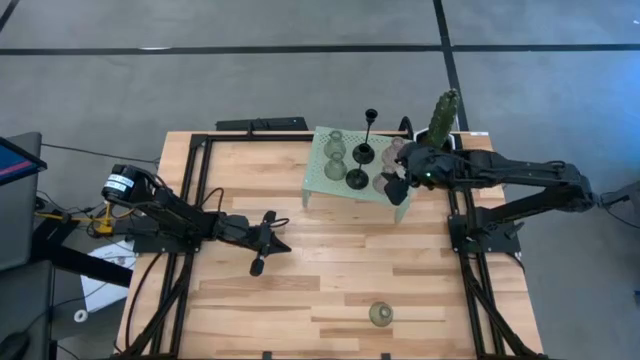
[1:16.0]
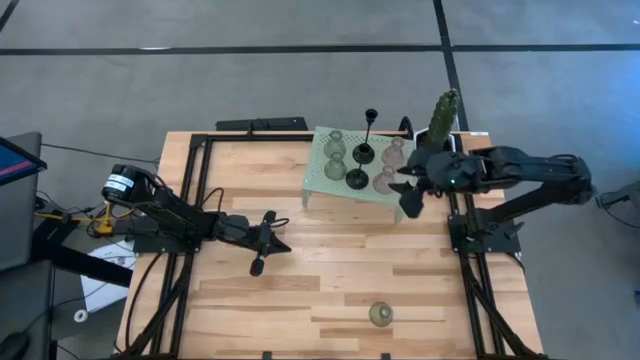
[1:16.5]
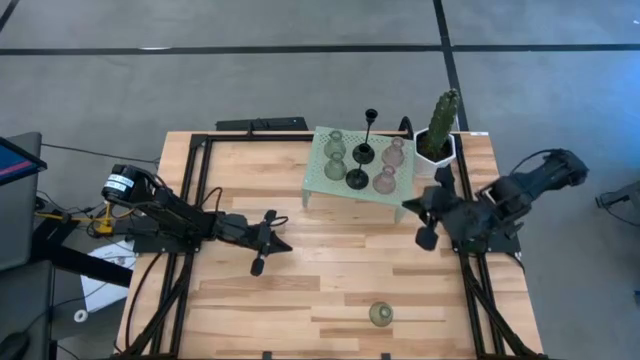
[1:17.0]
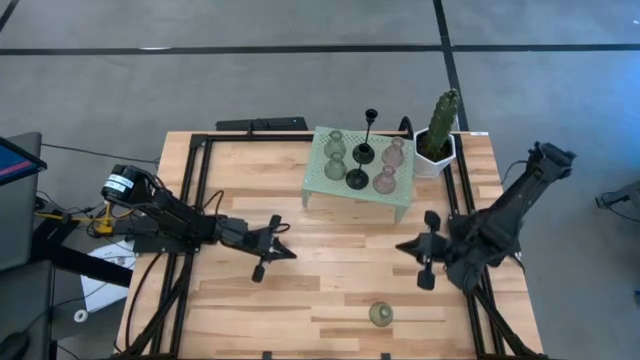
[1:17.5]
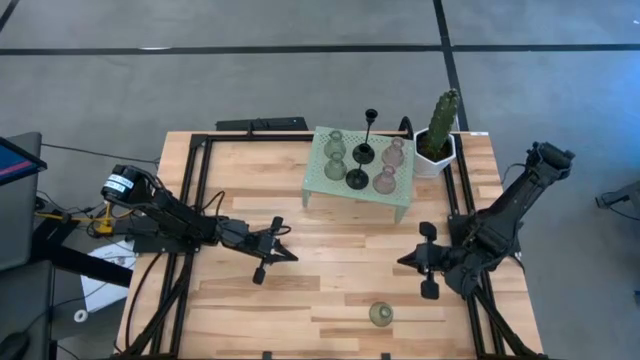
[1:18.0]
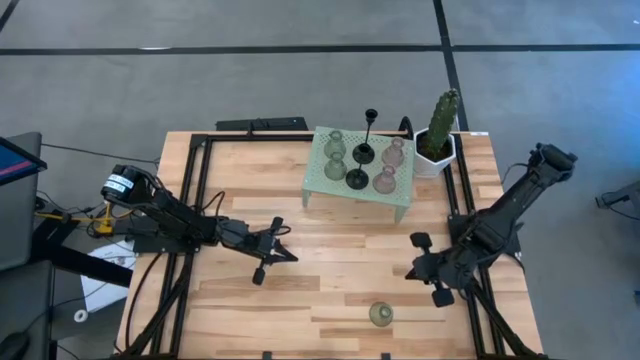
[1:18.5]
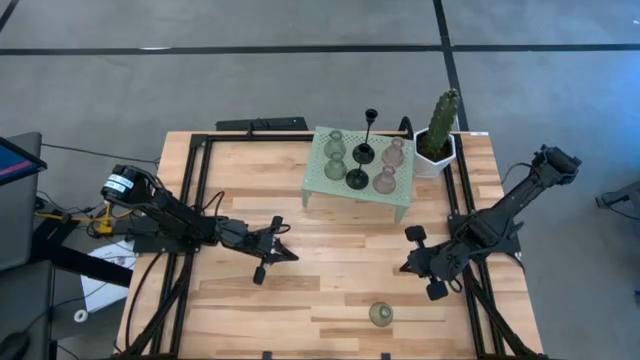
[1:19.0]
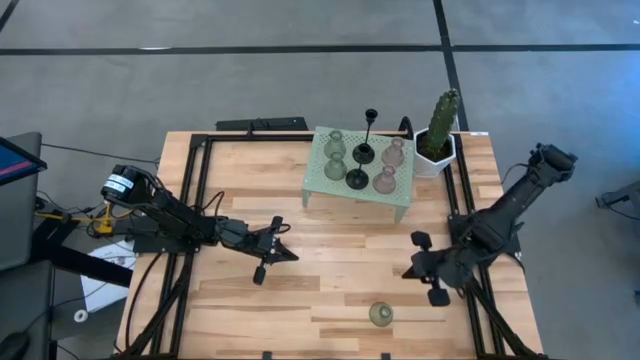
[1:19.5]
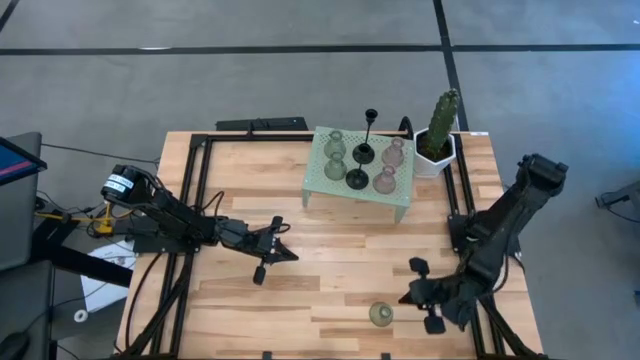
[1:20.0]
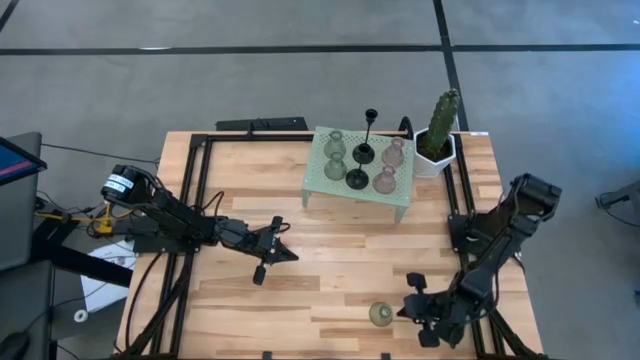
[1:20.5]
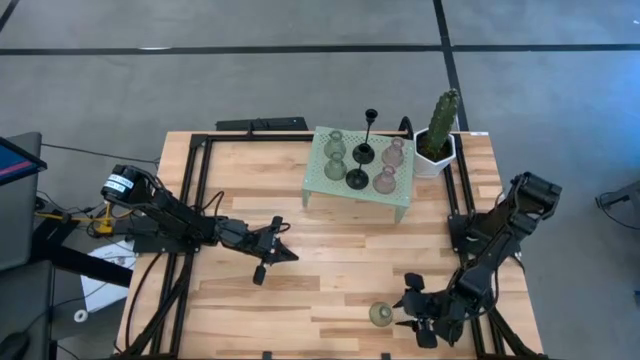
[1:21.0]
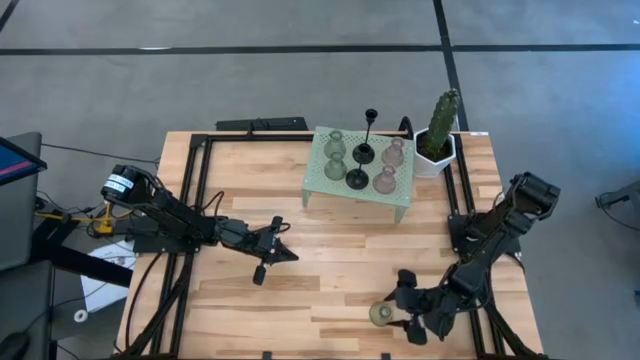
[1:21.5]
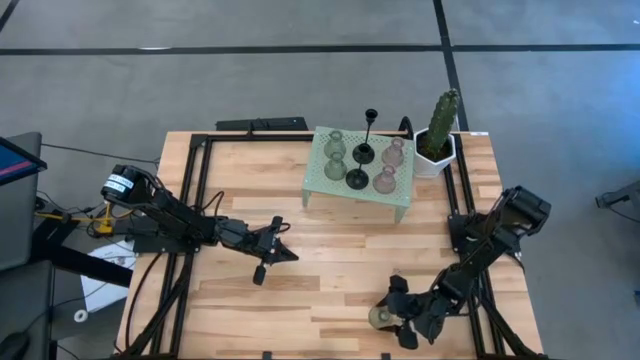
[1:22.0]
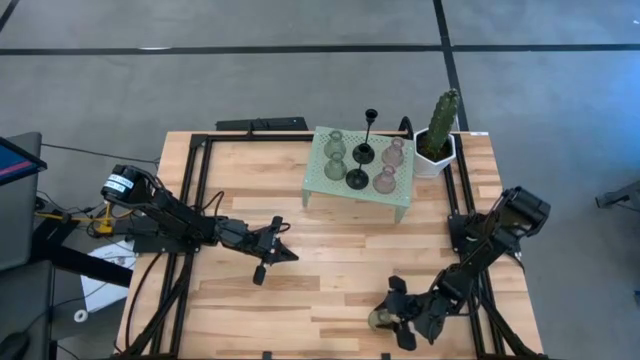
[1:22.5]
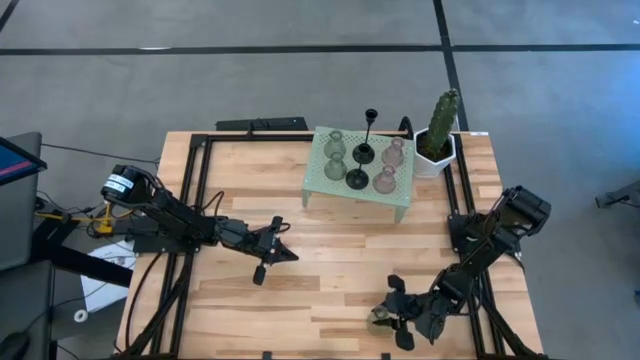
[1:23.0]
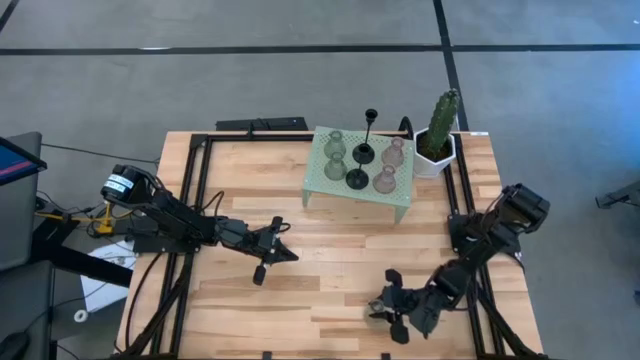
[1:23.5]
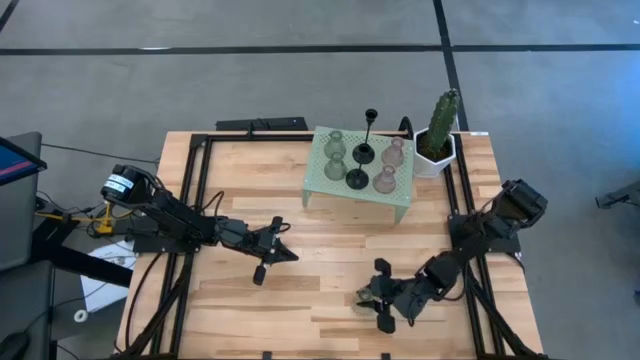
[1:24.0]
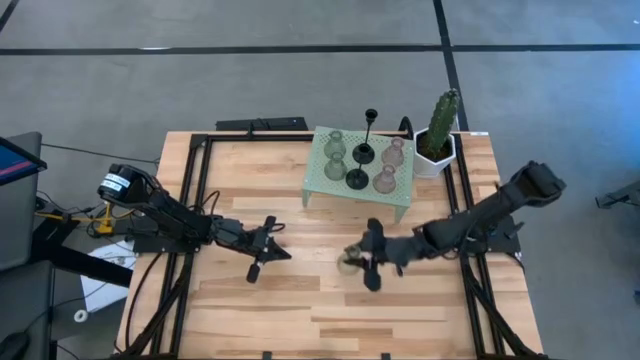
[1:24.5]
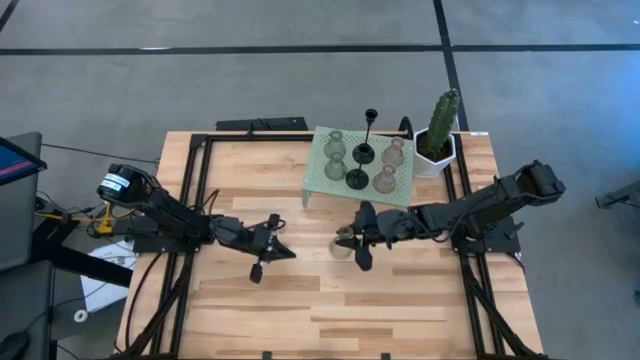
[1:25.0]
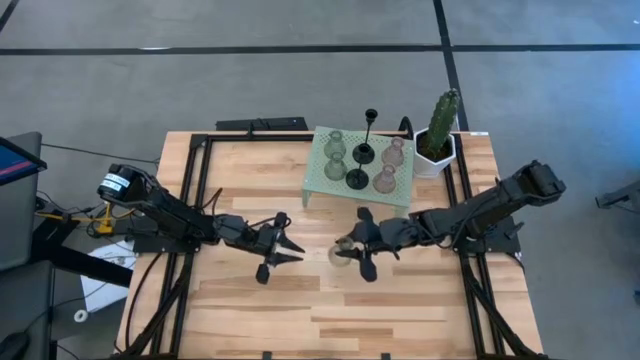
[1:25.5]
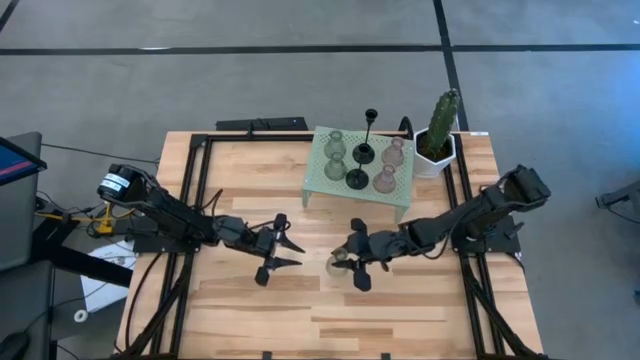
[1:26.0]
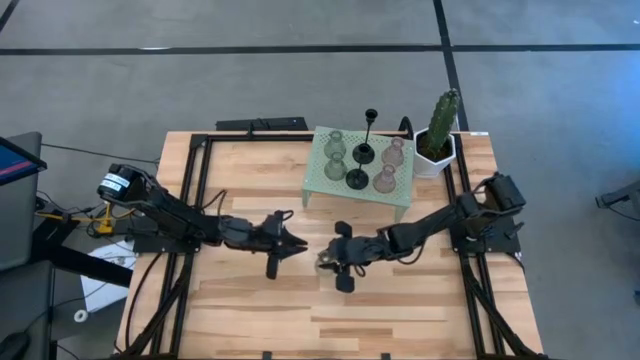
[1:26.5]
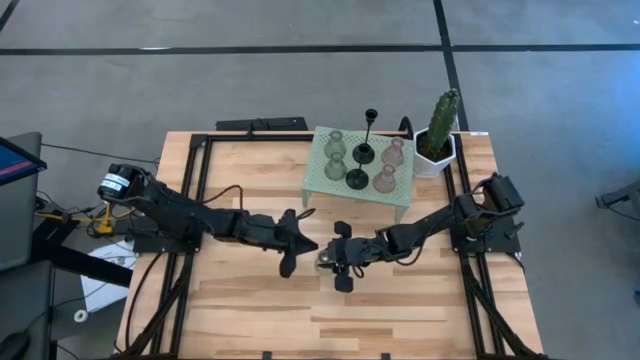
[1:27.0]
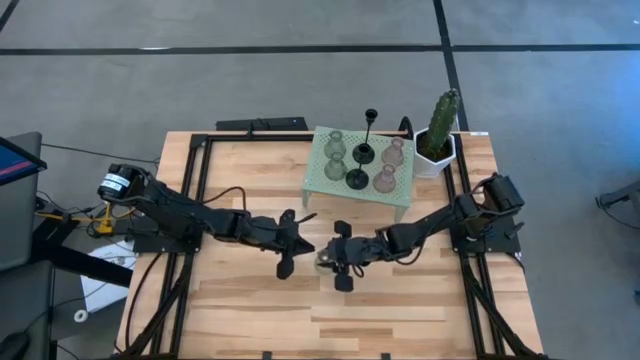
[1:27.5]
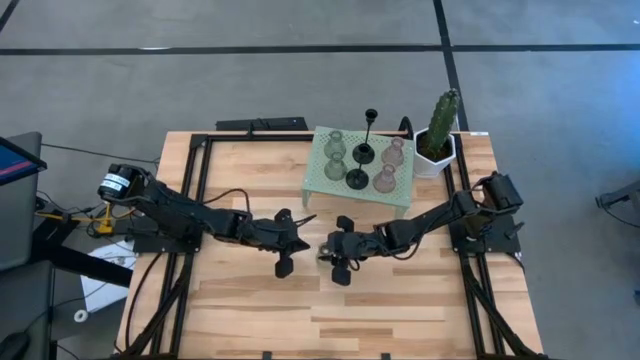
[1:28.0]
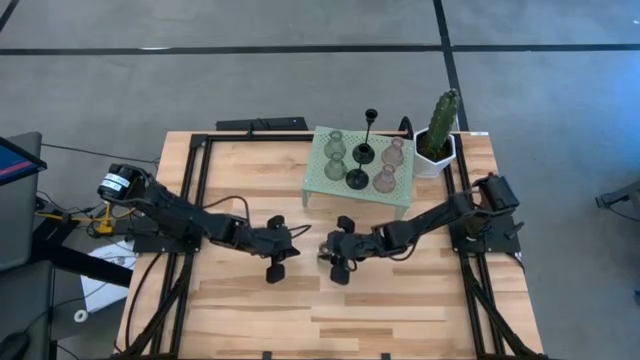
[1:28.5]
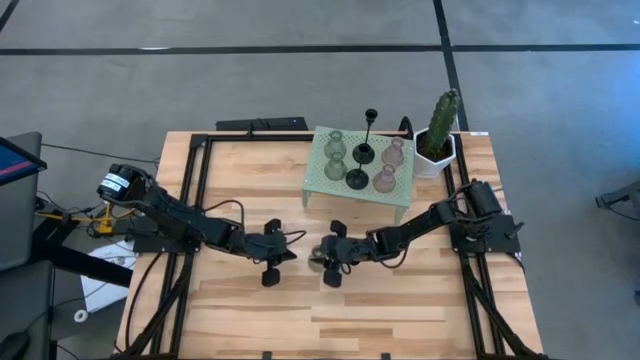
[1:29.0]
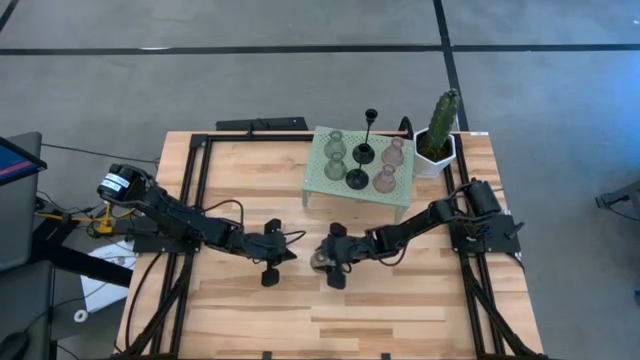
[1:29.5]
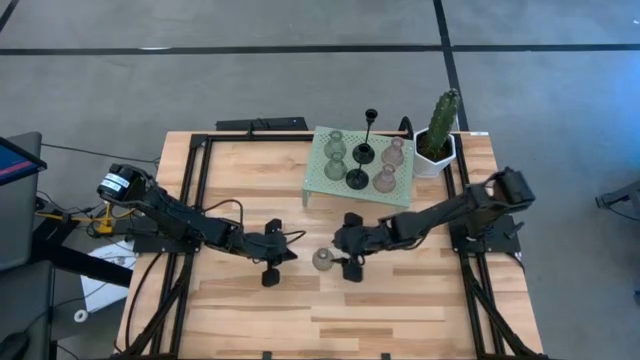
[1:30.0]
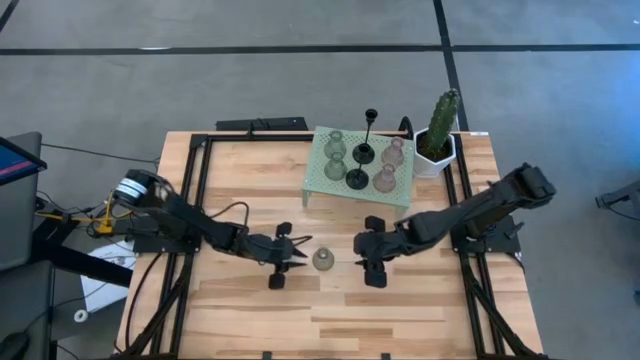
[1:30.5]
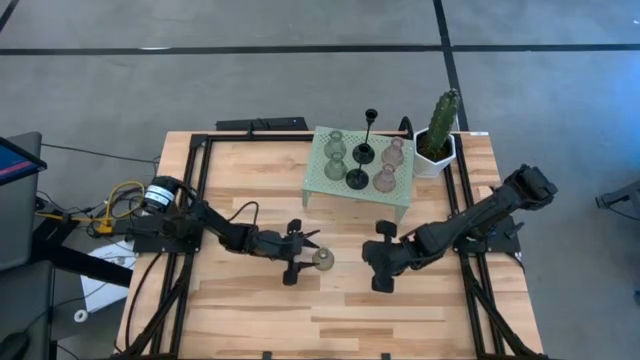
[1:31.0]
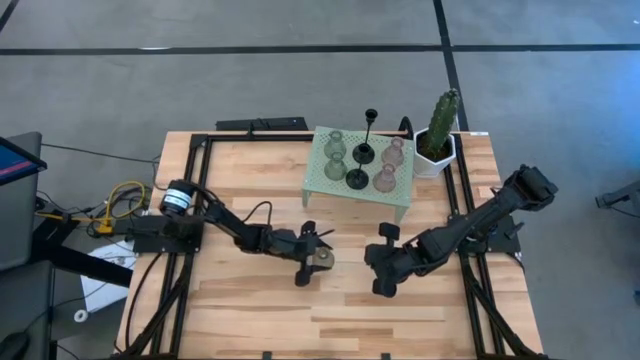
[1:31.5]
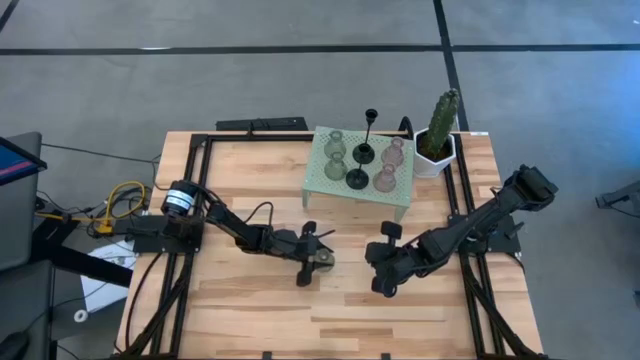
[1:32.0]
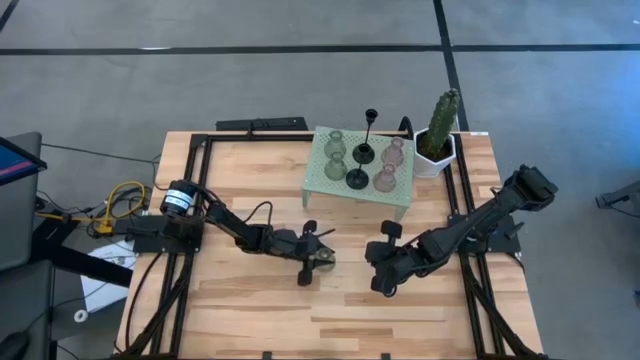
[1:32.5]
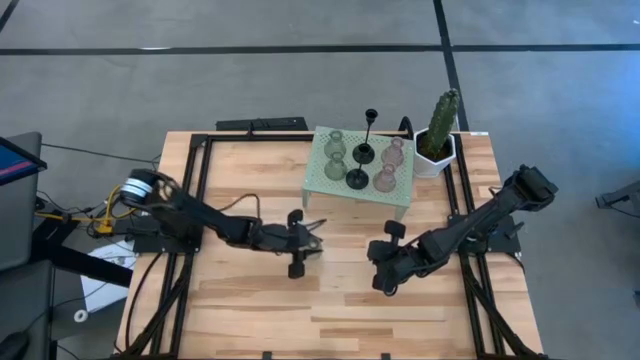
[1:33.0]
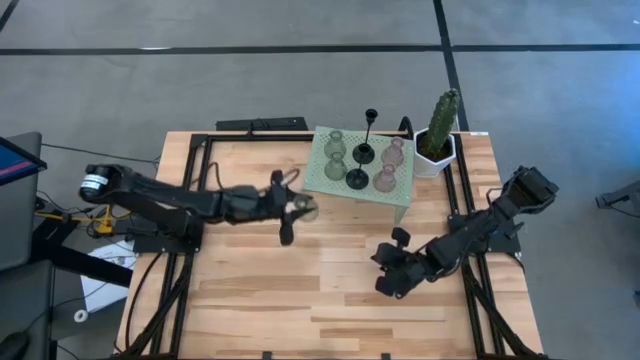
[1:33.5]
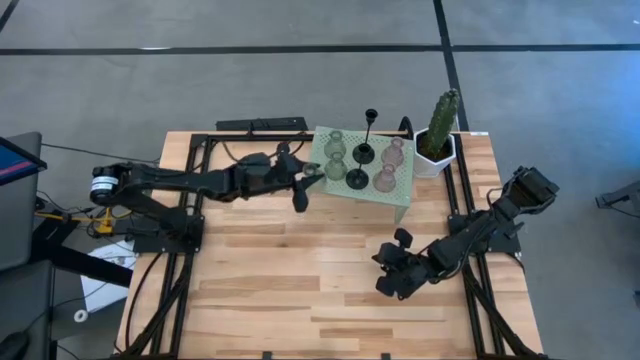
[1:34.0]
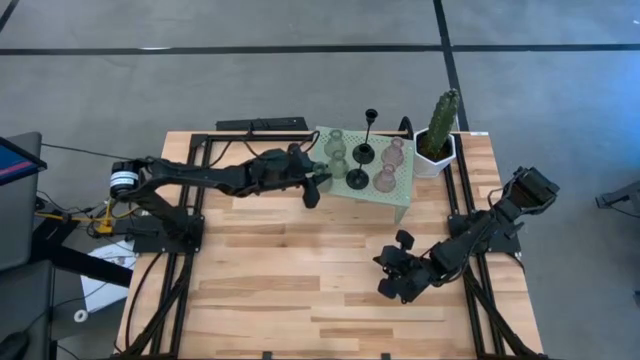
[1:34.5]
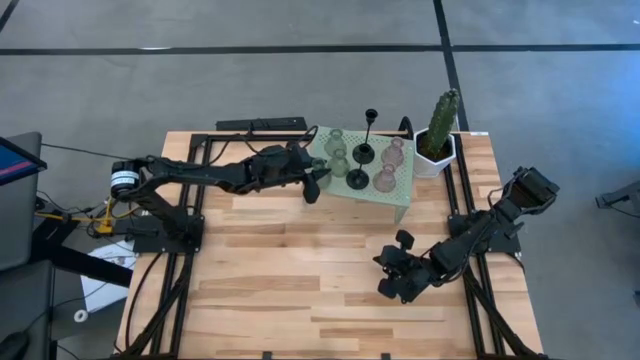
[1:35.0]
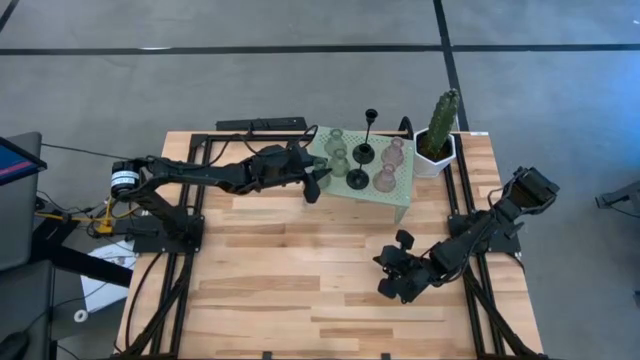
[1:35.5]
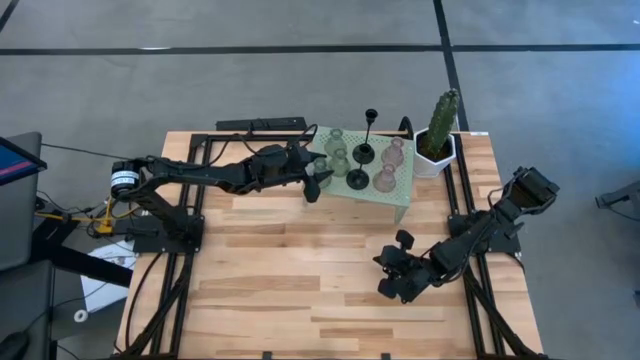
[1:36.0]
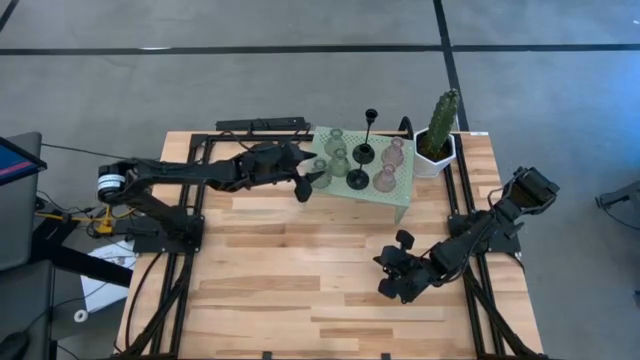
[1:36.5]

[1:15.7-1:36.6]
Task: Pick & Place candle stick holders
Put the green glass candle holder on the shelf aligned with the other green glass candle holders
